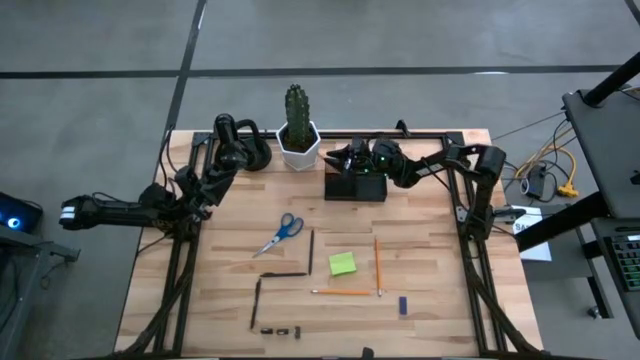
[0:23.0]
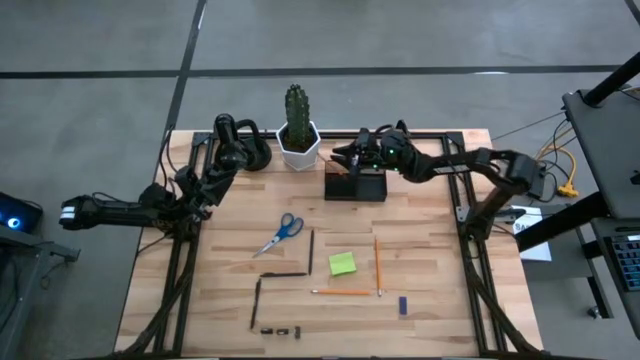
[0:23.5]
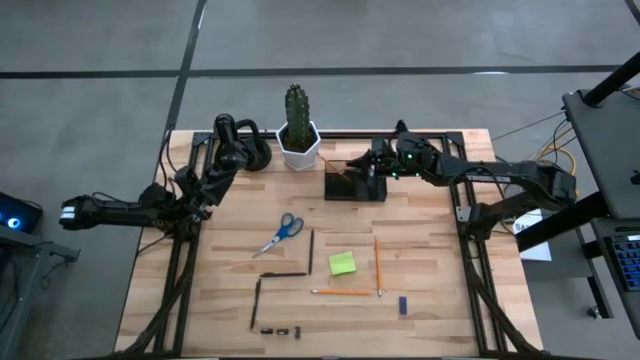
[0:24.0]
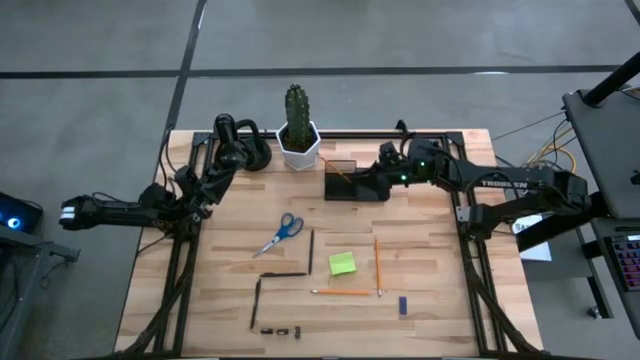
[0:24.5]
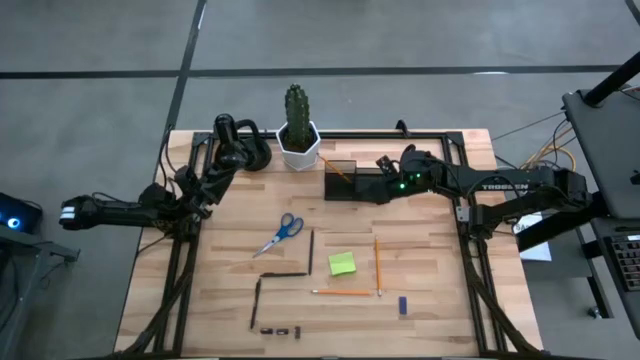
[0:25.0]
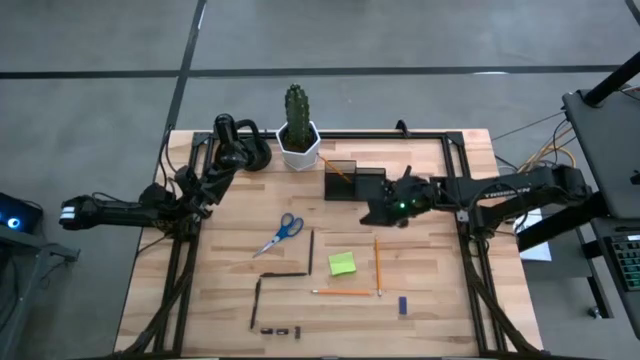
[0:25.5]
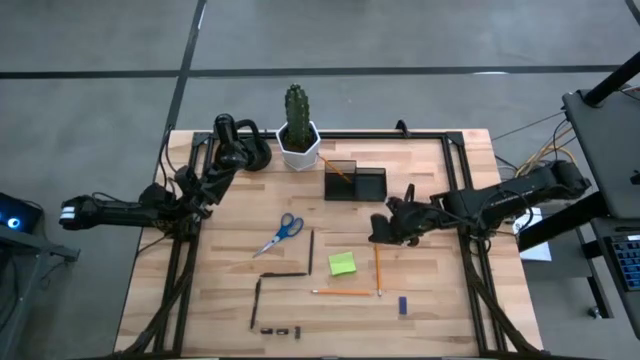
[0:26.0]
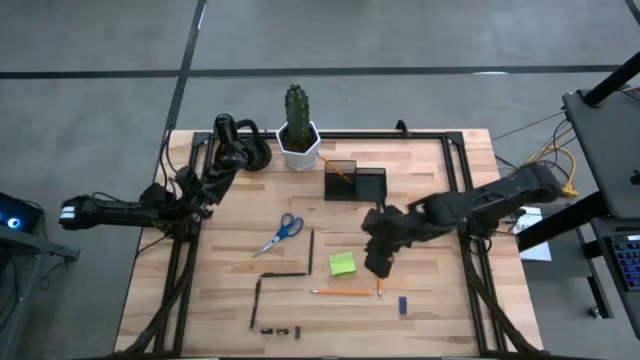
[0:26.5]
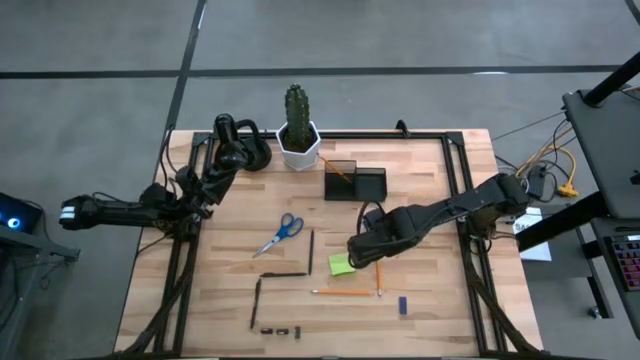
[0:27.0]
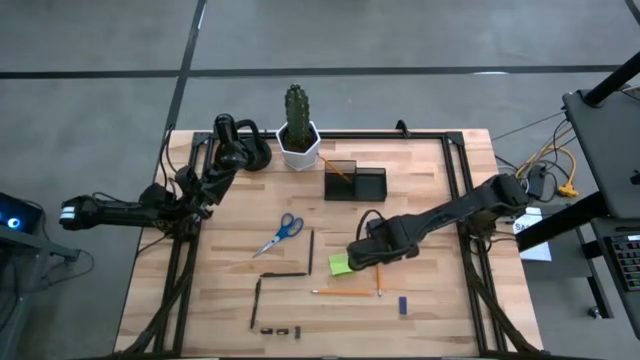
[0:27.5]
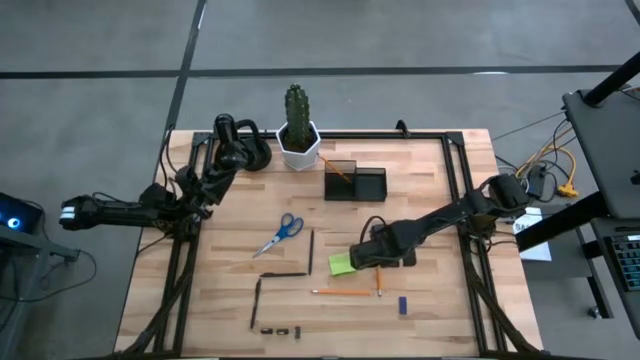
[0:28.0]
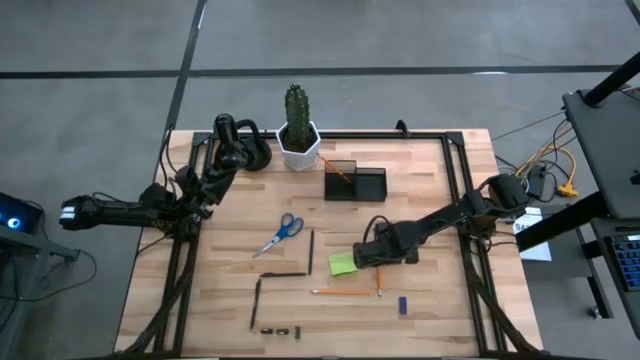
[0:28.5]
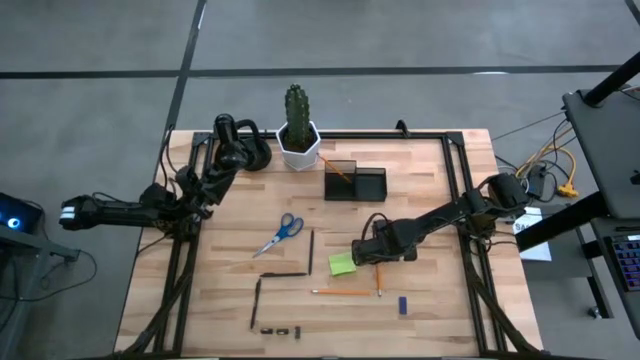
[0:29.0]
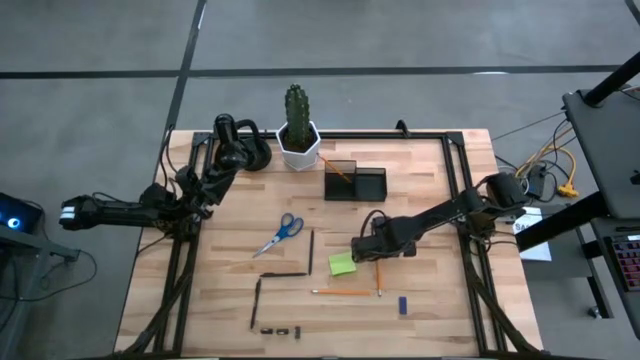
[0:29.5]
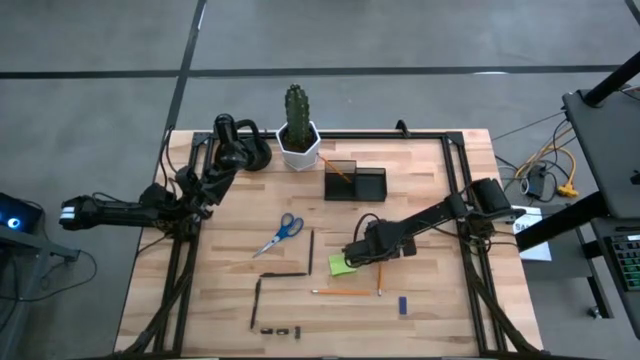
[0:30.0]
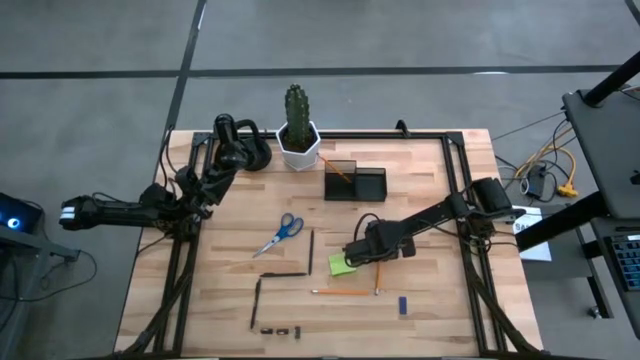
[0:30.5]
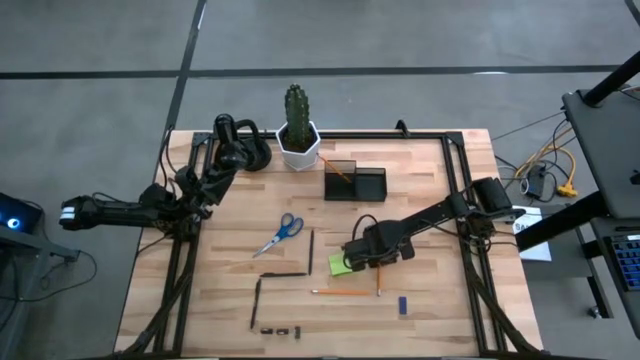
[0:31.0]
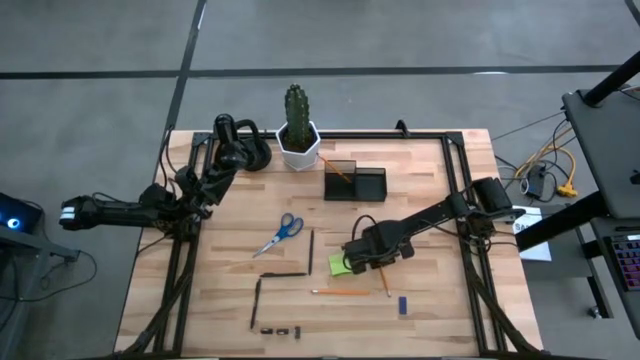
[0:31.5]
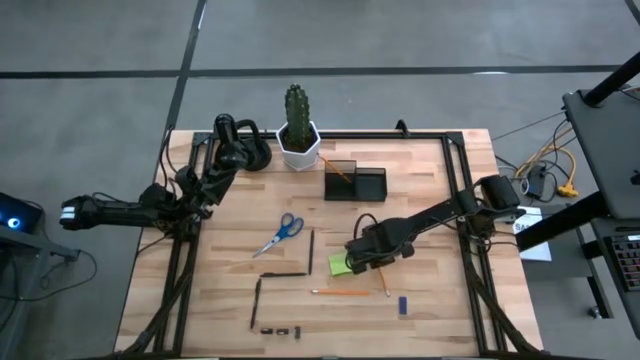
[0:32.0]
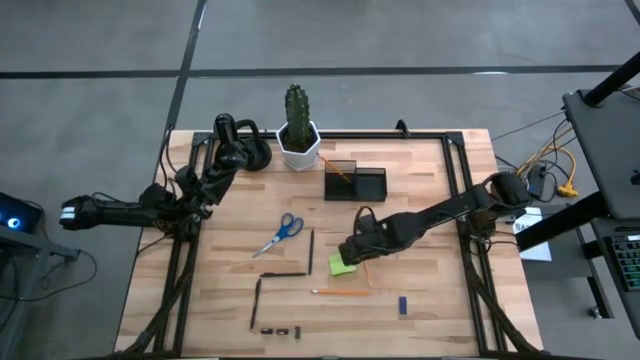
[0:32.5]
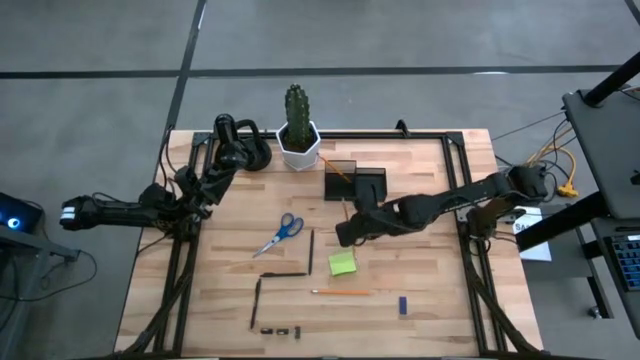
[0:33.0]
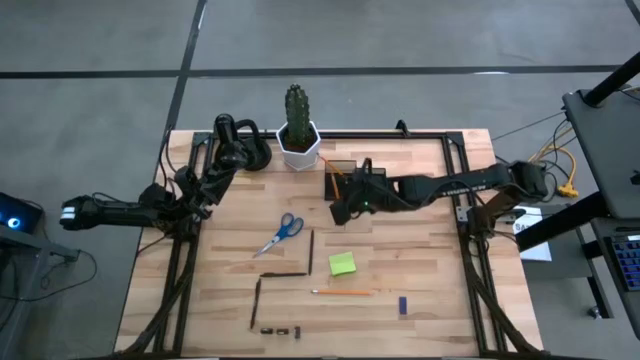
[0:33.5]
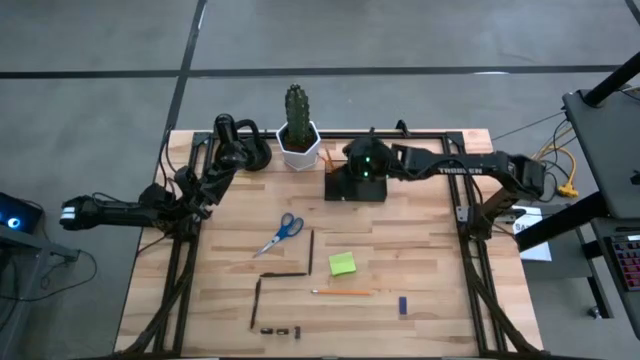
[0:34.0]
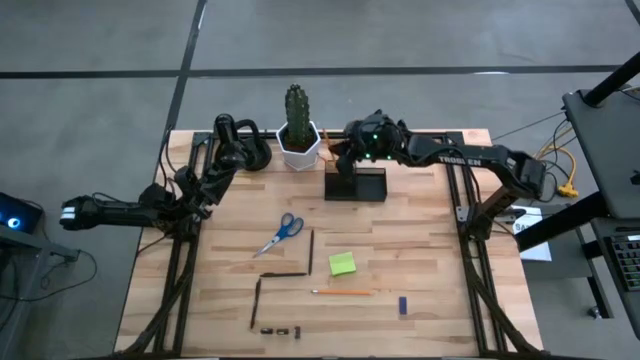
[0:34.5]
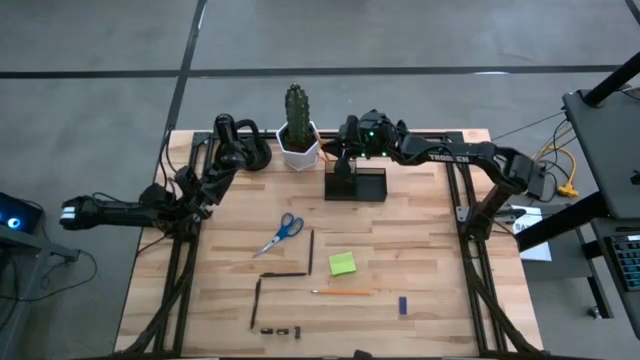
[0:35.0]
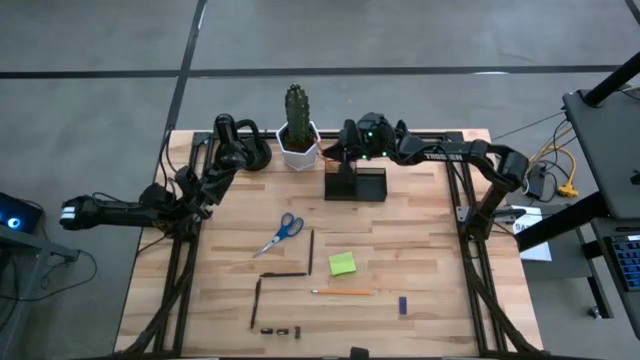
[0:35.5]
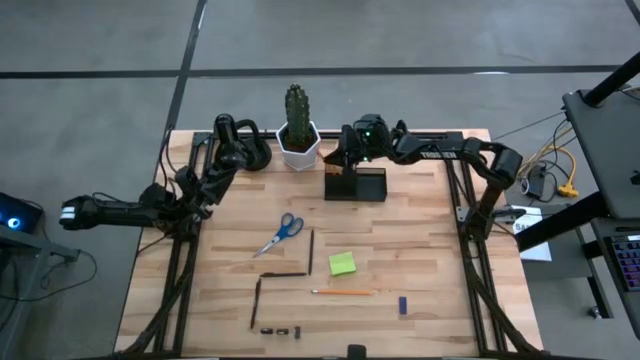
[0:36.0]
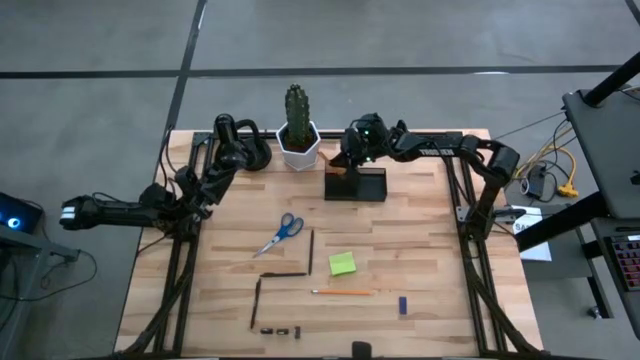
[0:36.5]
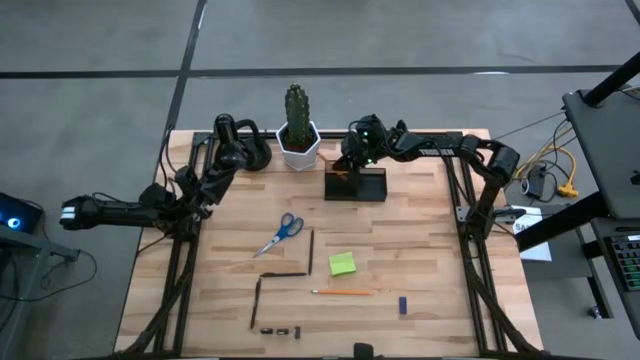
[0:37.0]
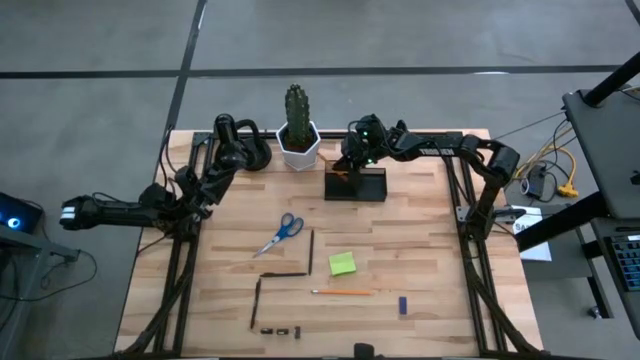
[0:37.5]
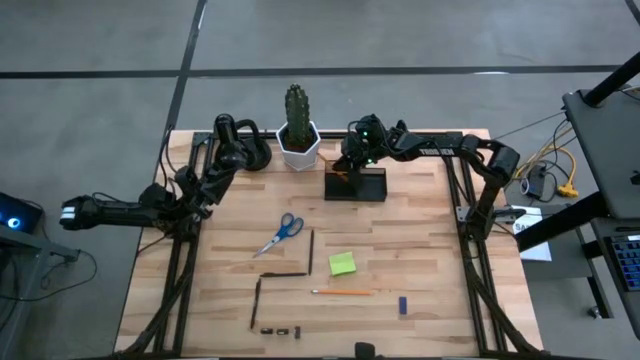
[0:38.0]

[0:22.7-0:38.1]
Task: Pick and place office supplies into organizer
Put the top pencil into the left section of the desk organizer

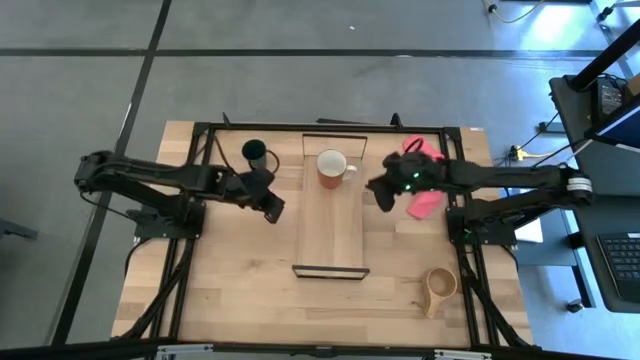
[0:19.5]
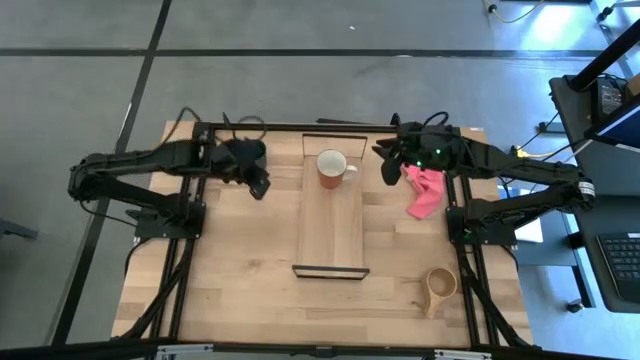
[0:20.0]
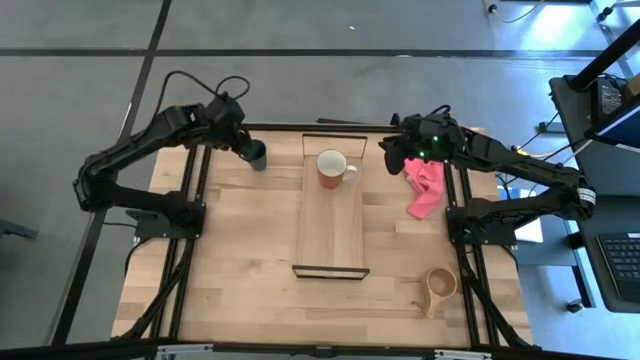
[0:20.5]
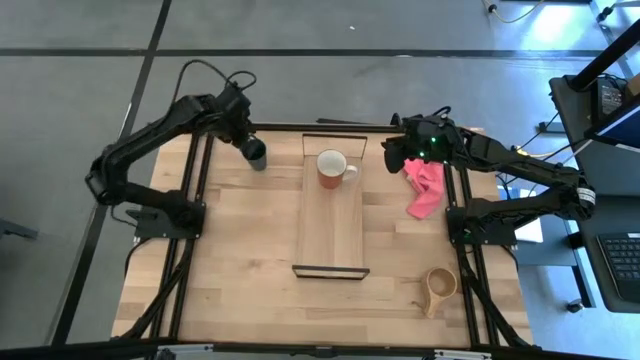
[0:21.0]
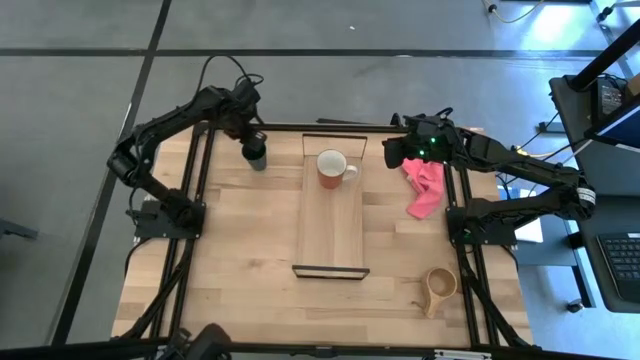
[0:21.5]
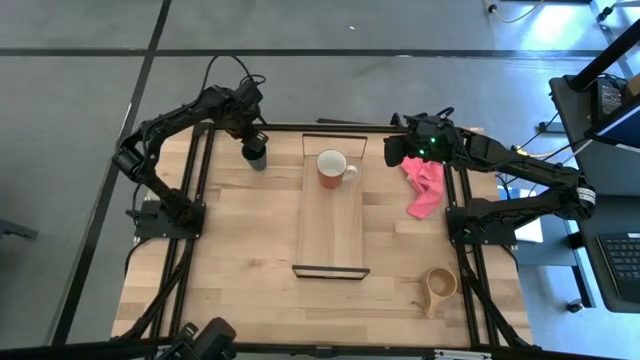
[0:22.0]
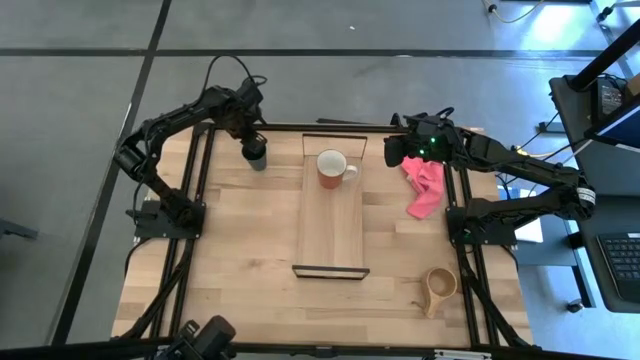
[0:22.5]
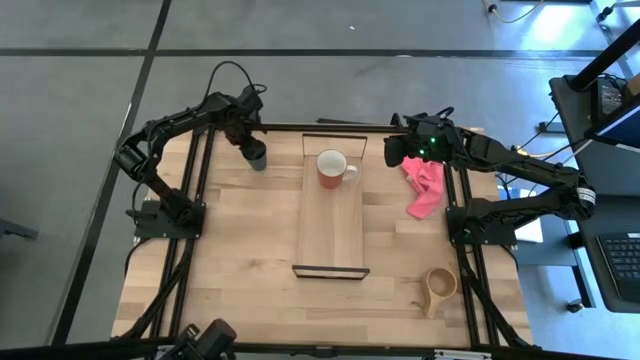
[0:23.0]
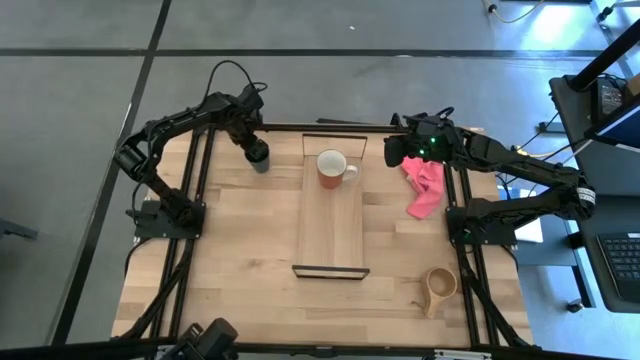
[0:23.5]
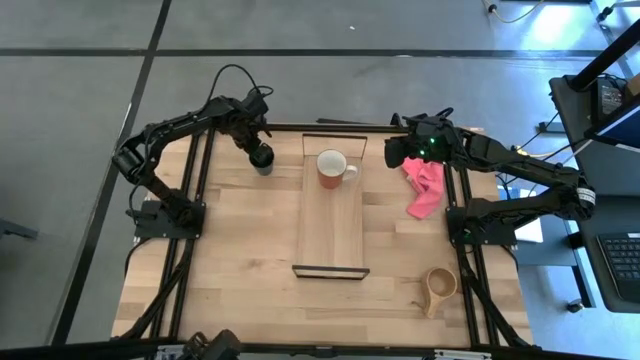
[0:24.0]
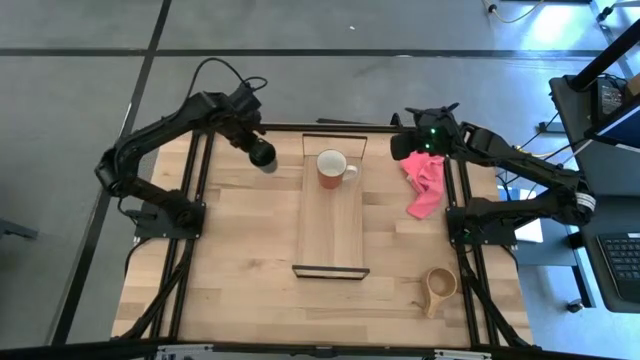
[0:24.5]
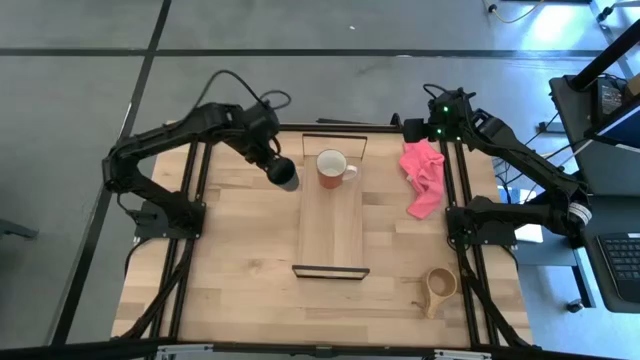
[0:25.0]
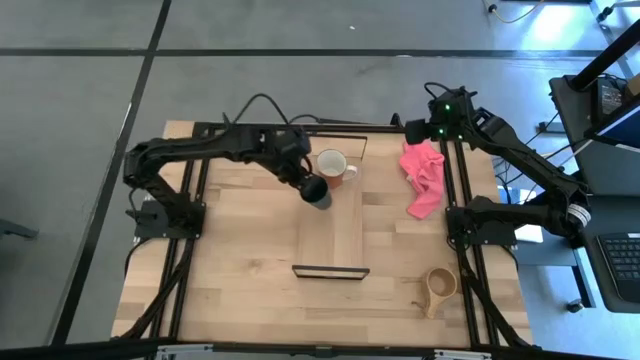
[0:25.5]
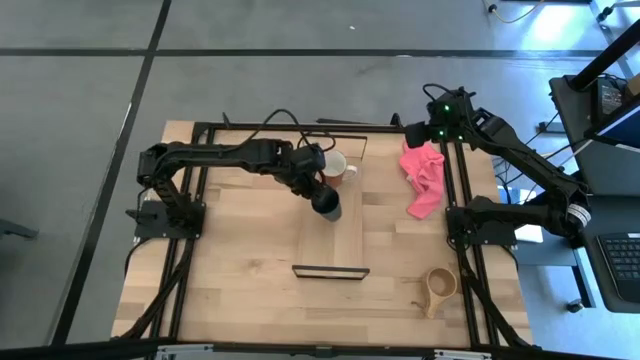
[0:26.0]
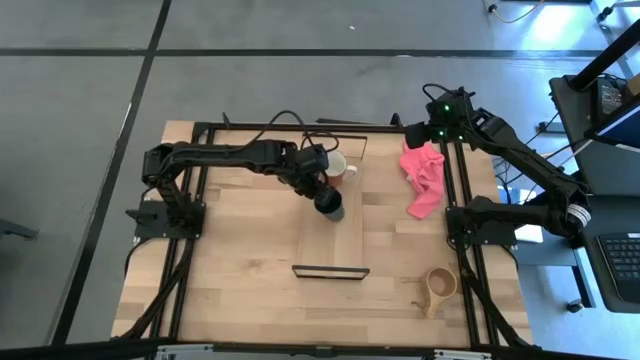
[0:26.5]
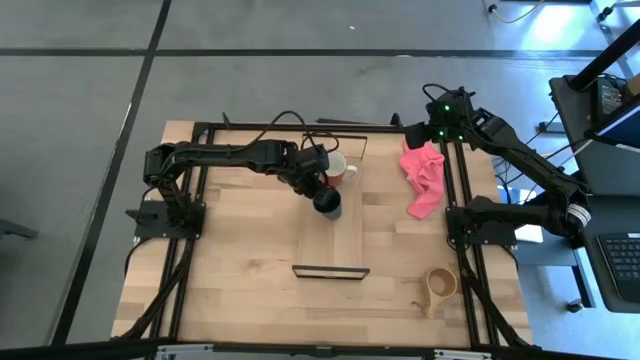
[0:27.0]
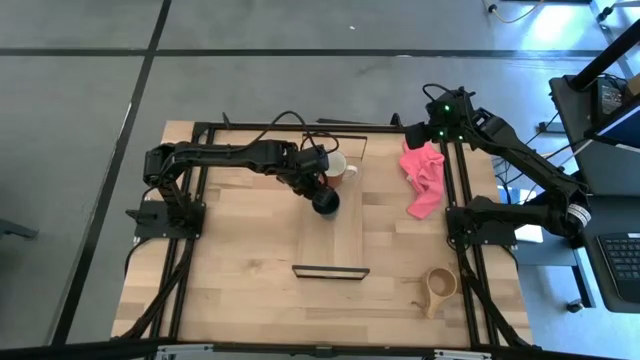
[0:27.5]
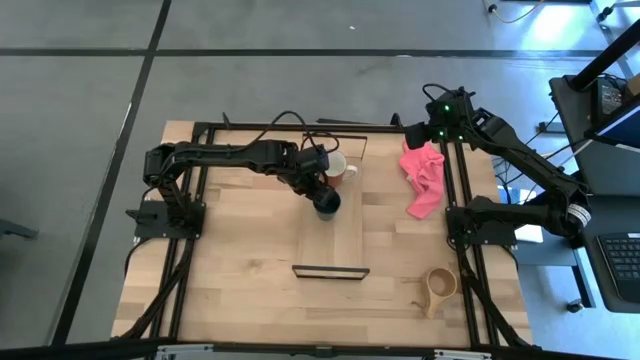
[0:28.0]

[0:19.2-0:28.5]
Task: Stack small to large cups/mugs on shelf
Put the blue cup on the shelf
